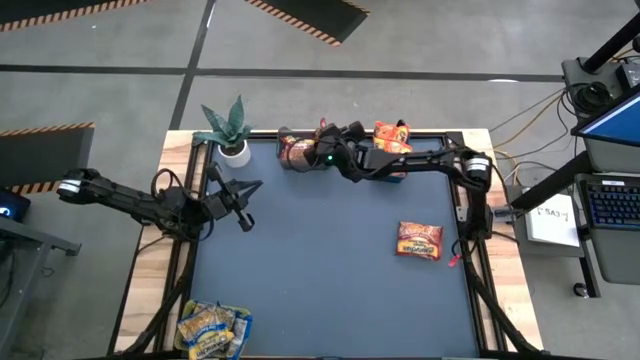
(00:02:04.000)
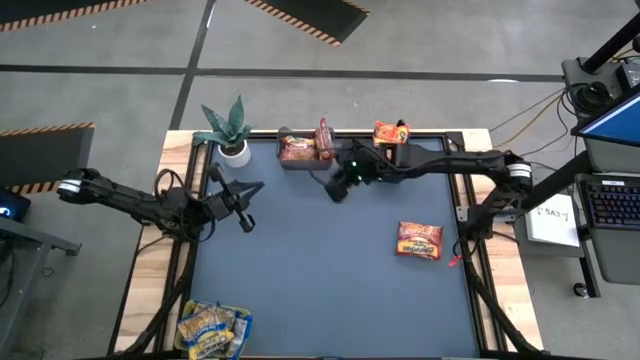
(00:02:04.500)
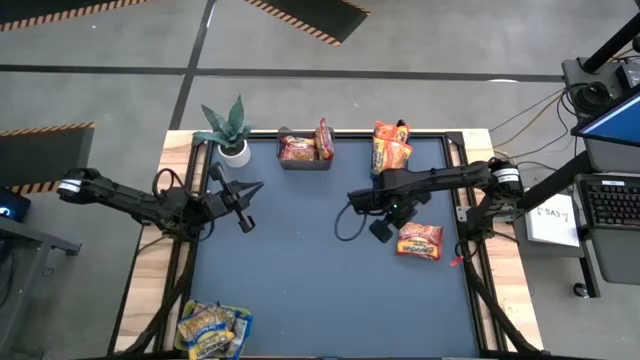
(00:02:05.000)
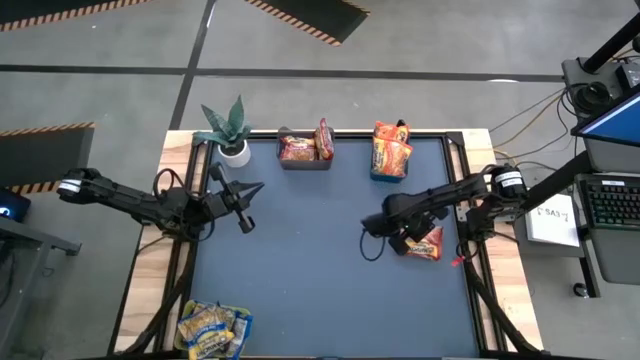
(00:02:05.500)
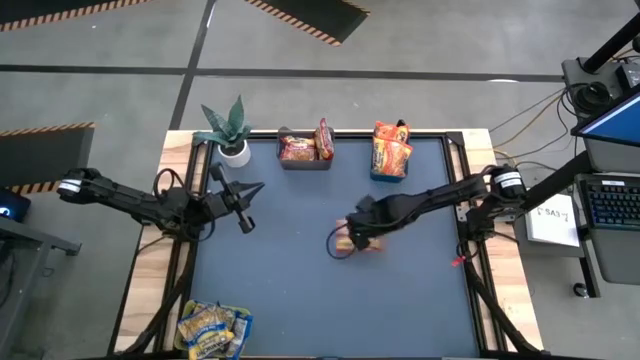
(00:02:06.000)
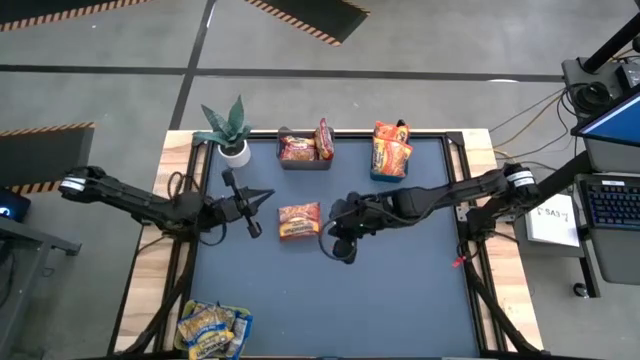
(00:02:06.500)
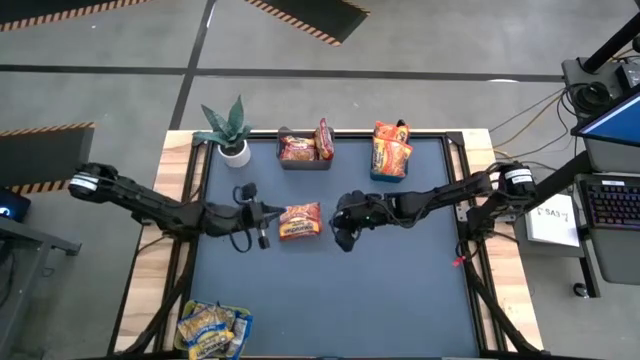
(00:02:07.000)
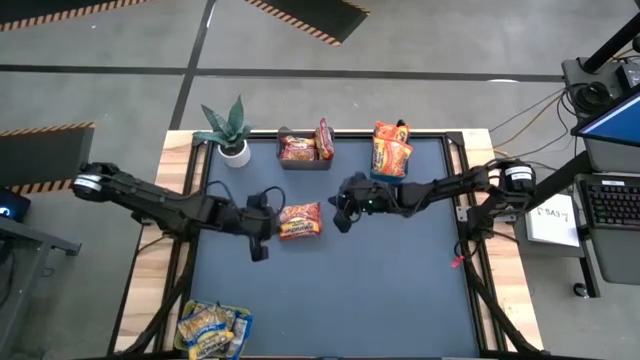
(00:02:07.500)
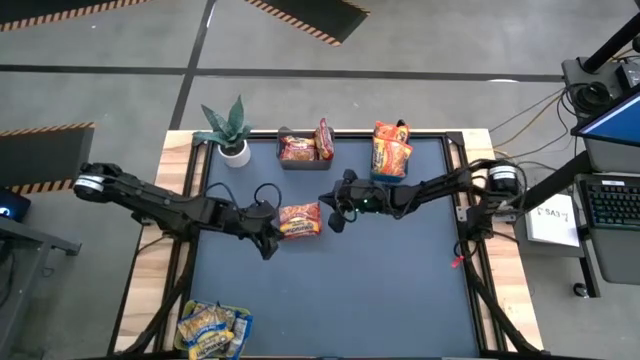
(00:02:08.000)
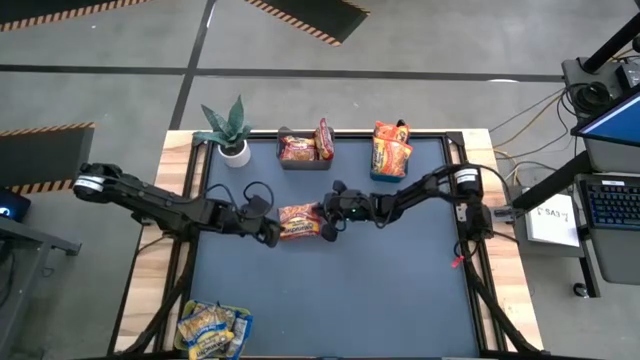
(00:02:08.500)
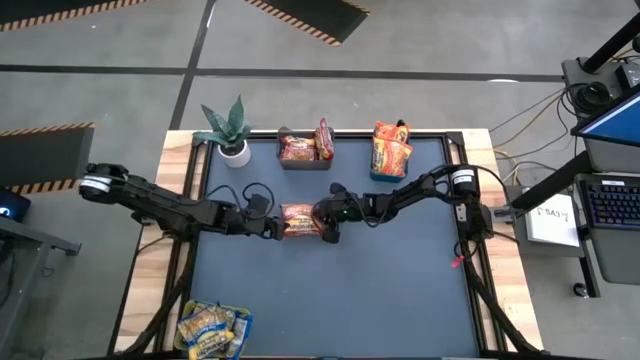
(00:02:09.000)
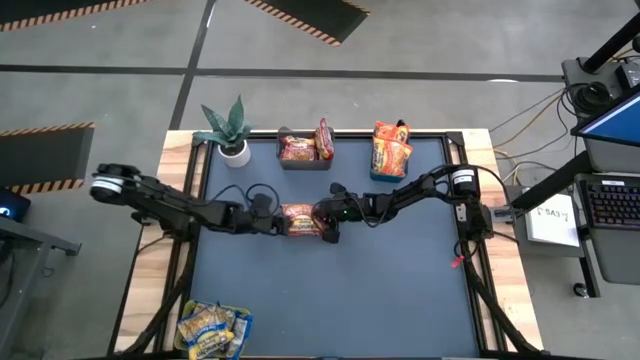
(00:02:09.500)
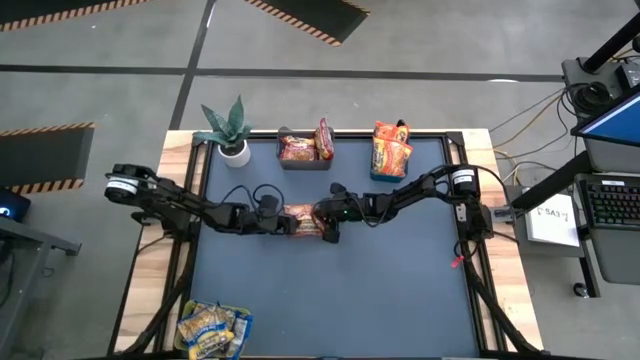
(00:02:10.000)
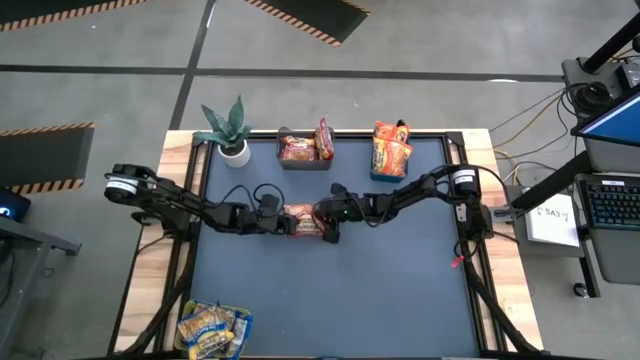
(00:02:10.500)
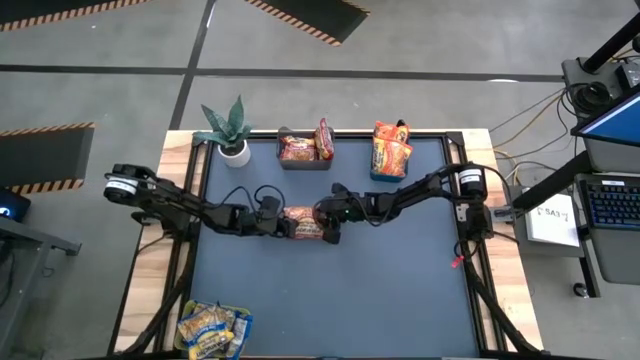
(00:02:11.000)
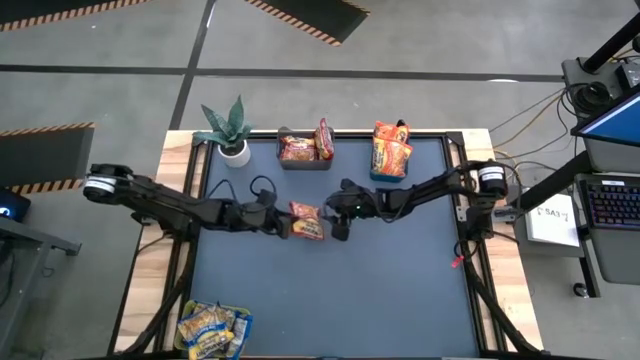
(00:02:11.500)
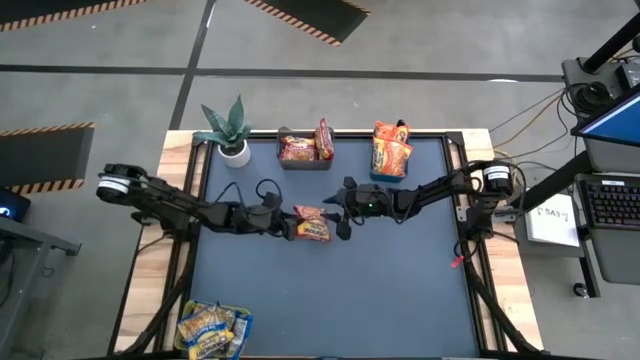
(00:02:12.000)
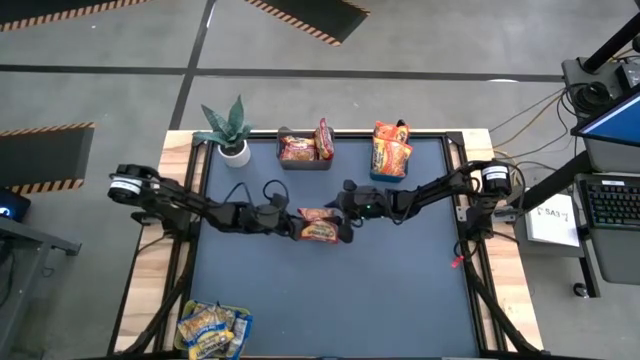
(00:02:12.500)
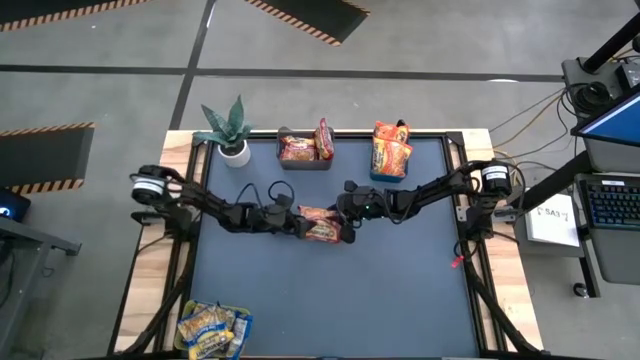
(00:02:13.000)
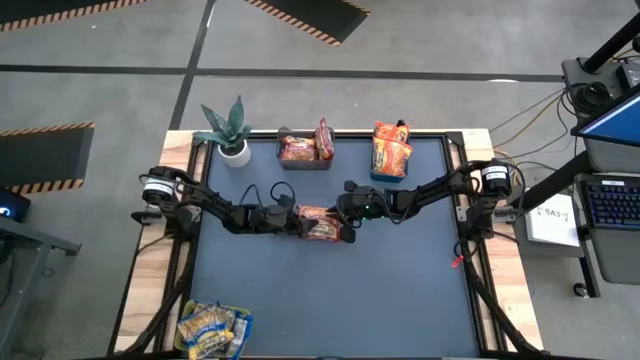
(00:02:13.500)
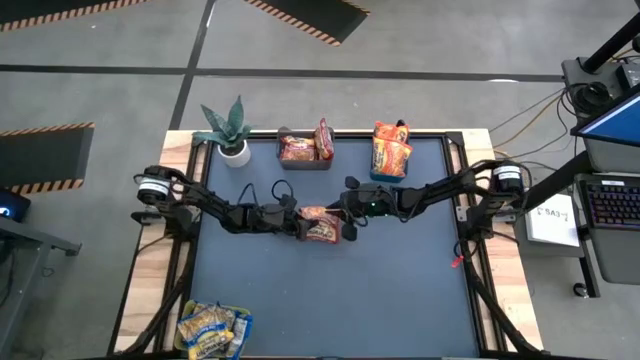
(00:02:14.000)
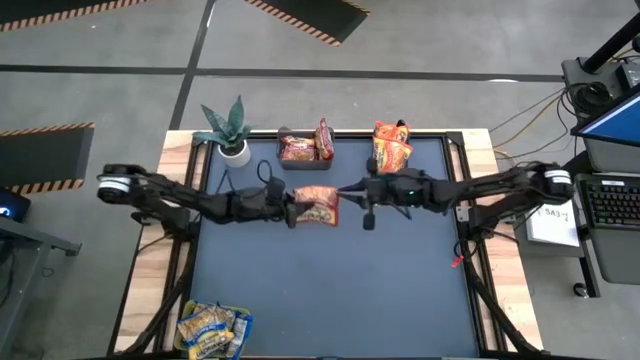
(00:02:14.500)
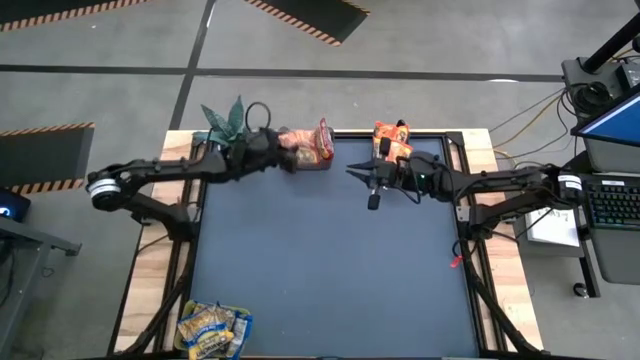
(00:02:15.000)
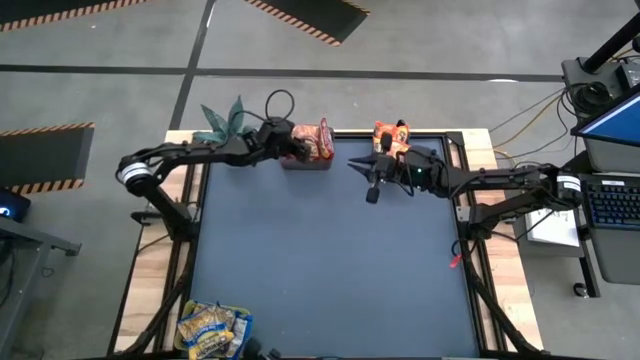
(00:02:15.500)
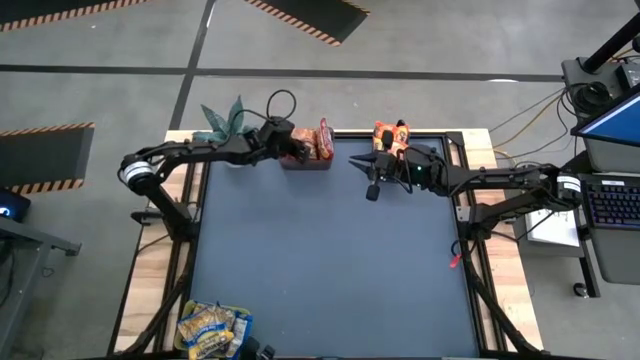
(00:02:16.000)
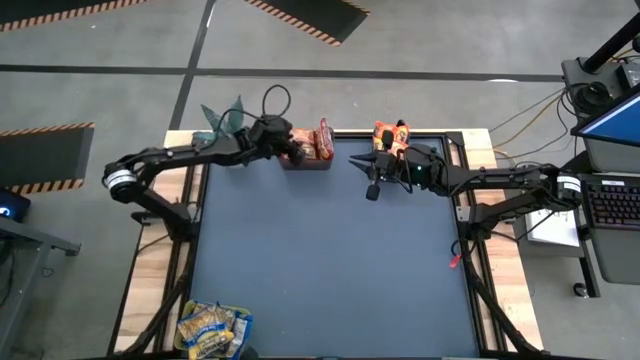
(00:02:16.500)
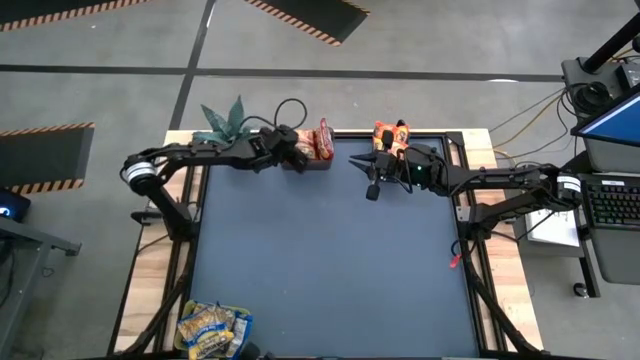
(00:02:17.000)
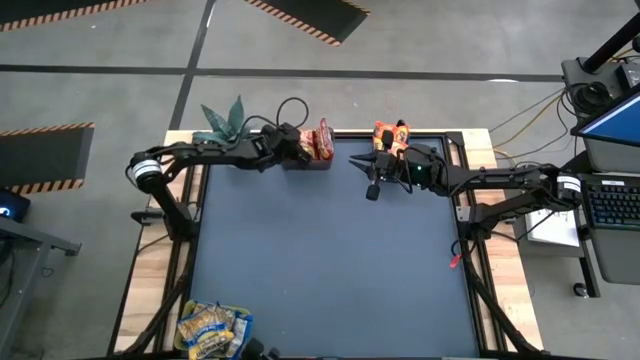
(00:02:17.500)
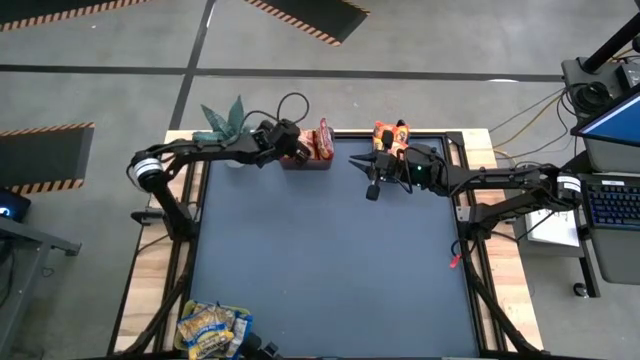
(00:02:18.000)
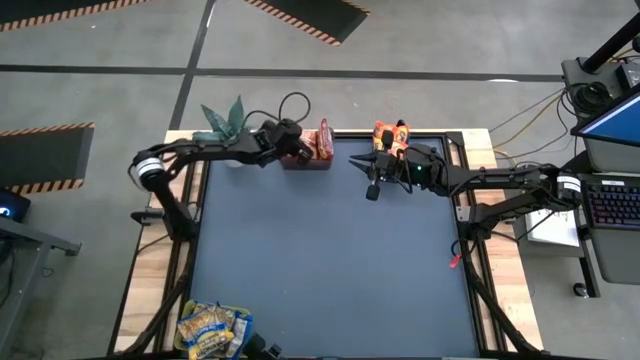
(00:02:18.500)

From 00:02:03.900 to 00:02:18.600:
Task: Sort Maruchan noodles
Put the red noodle pack into the black bin

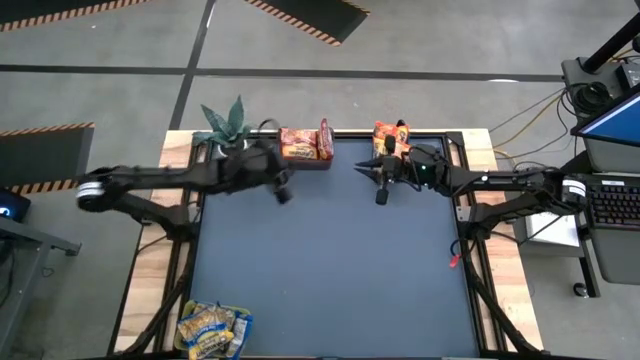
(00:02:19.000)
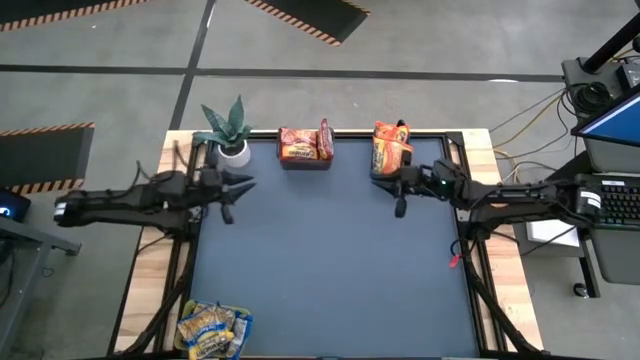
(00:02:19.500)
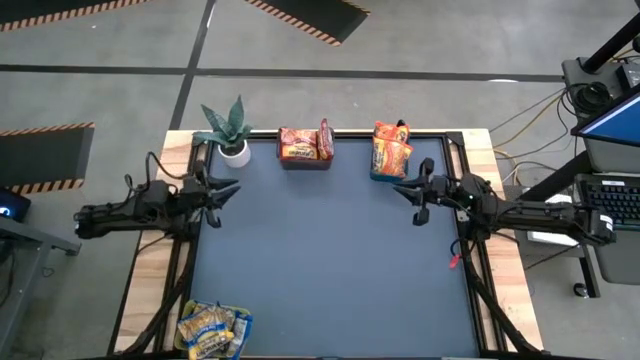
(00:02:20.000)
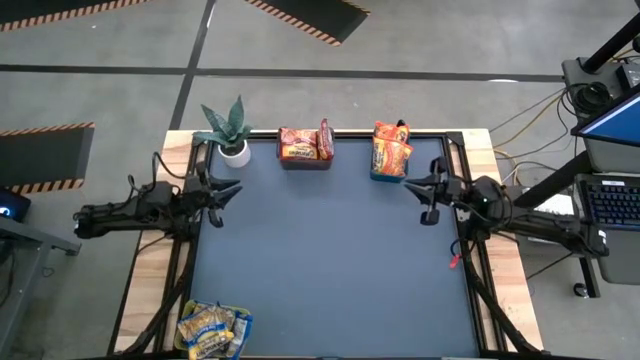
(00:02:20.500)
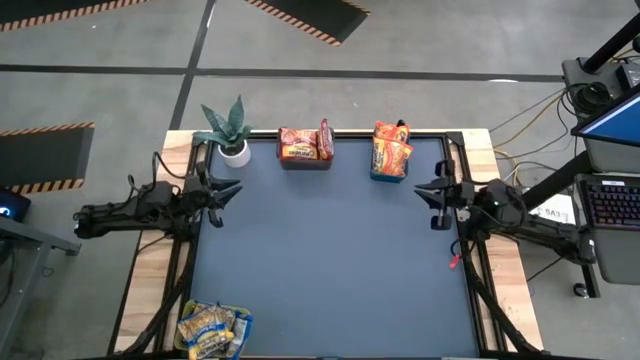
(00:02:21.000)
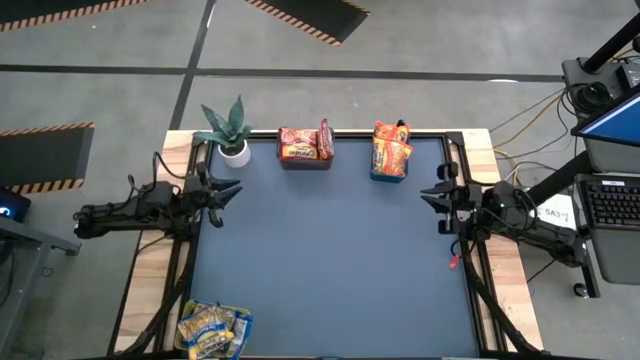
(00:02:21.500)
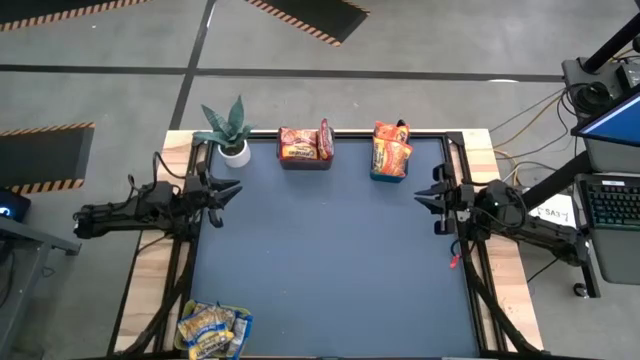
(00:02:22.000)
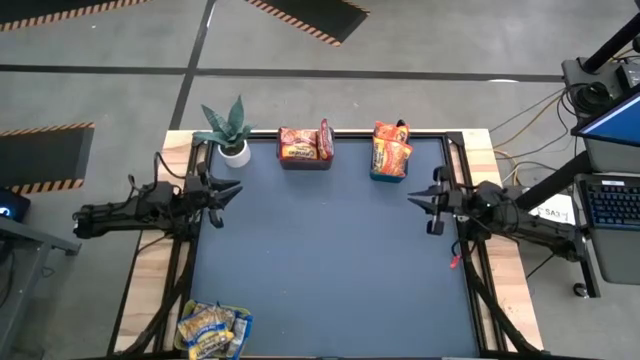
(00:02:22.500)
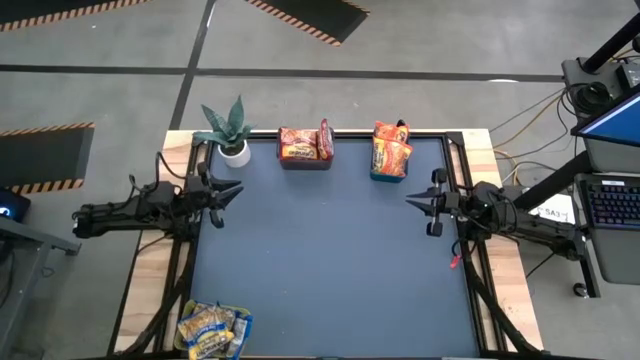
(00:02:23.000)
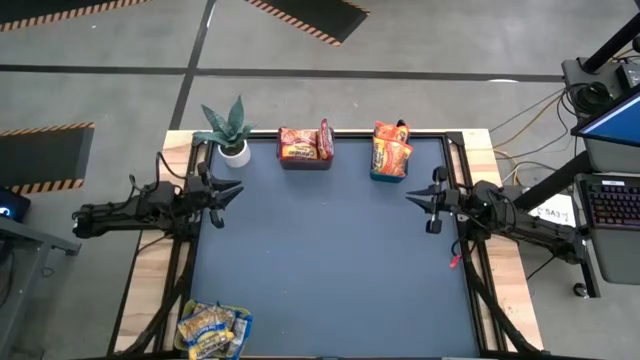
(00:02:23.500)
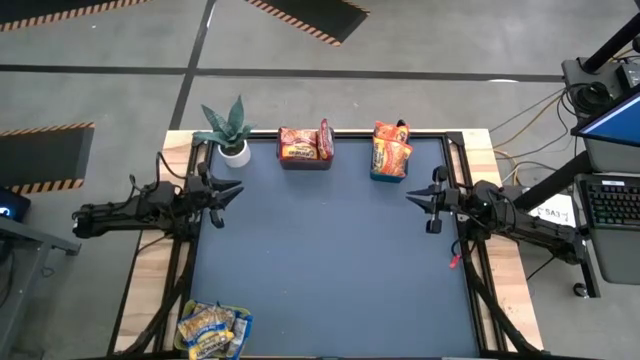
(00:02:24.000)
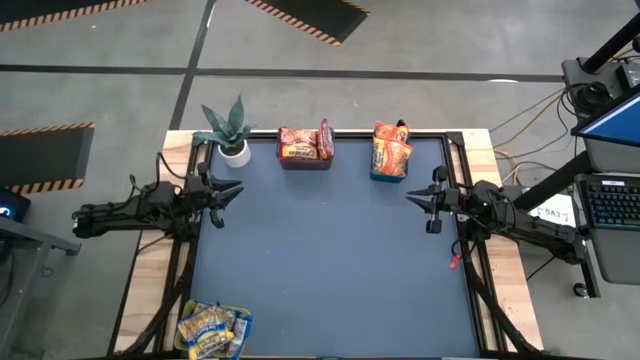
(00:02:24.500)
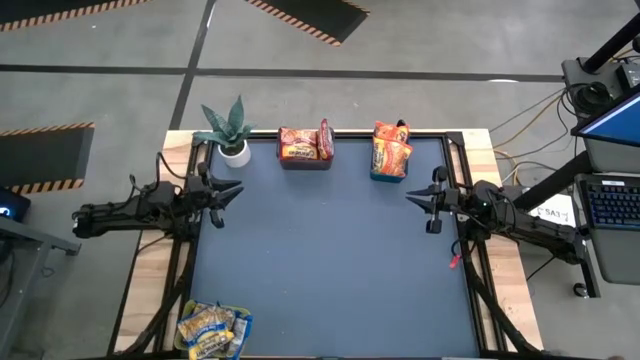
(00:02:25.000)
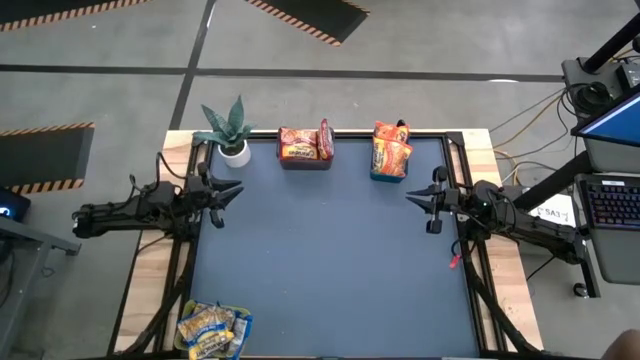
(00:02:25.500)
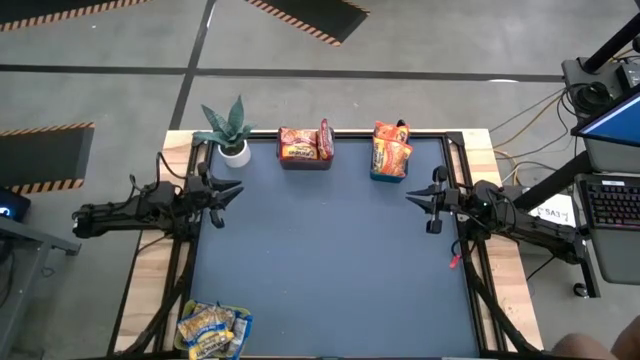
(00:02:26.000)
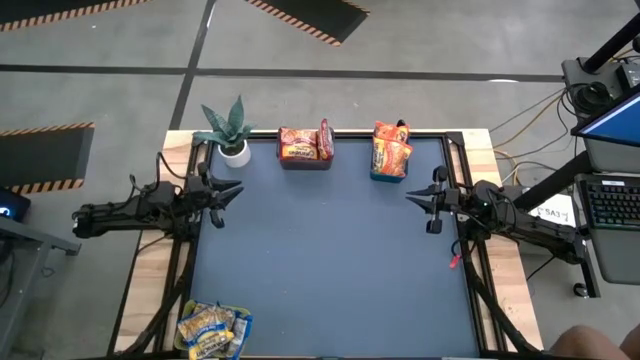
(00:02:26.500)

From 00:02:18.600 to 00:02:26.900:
Return to Home Position
